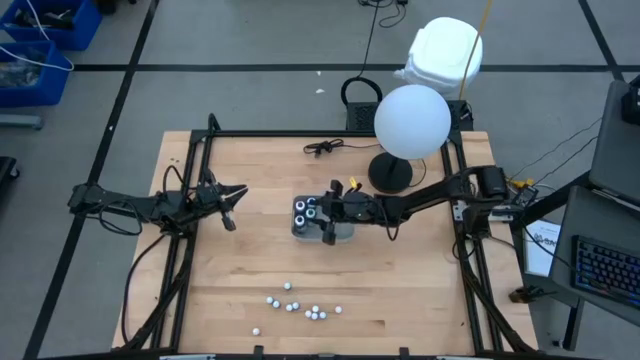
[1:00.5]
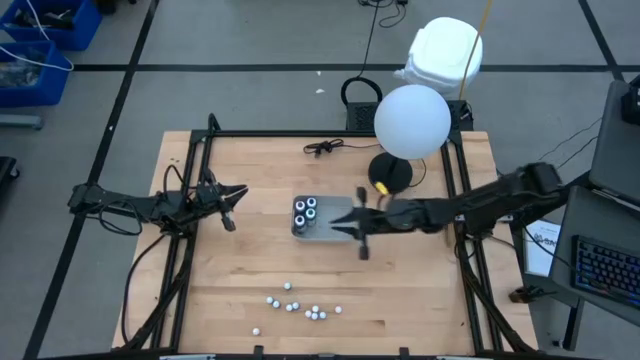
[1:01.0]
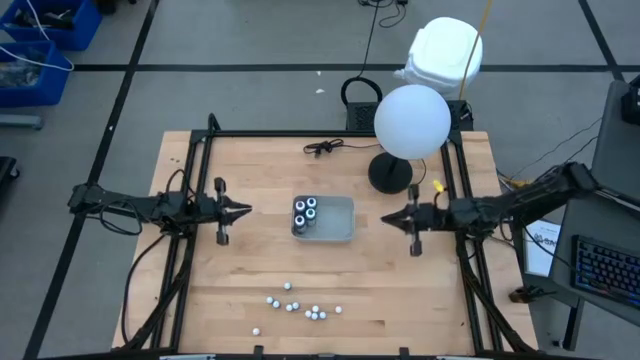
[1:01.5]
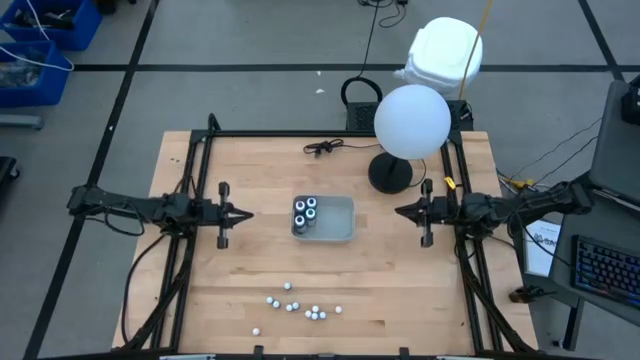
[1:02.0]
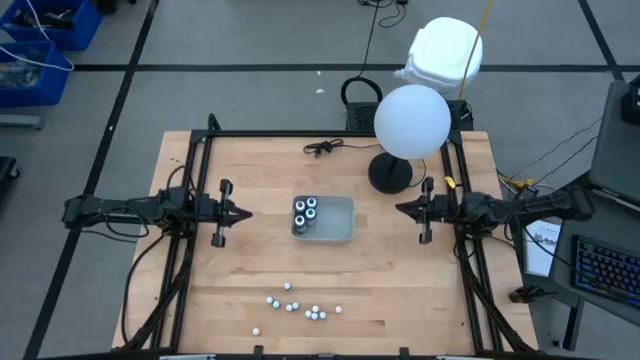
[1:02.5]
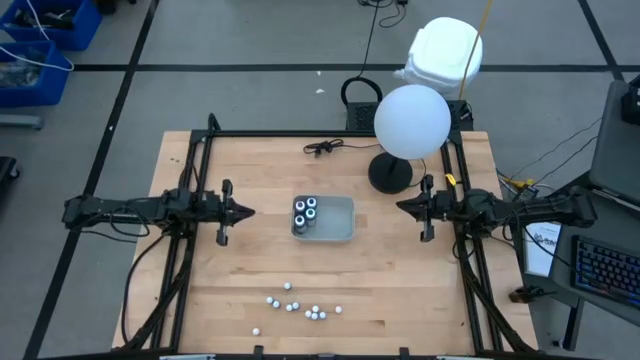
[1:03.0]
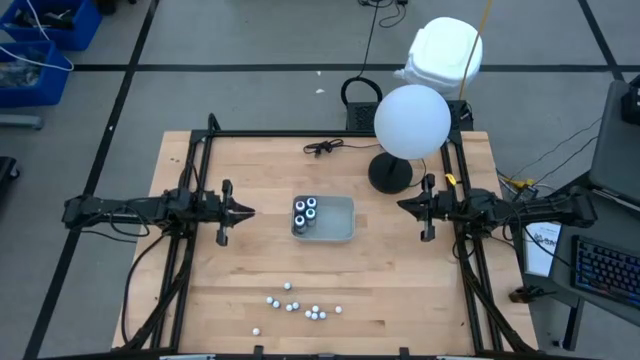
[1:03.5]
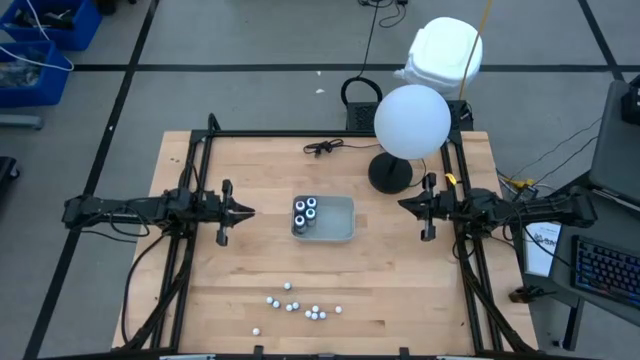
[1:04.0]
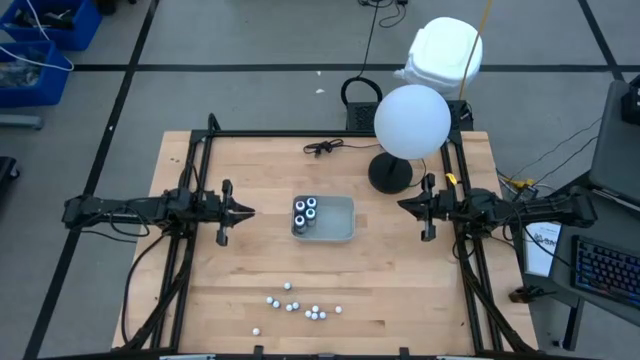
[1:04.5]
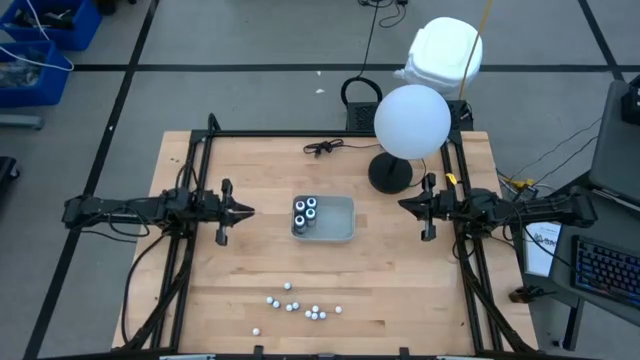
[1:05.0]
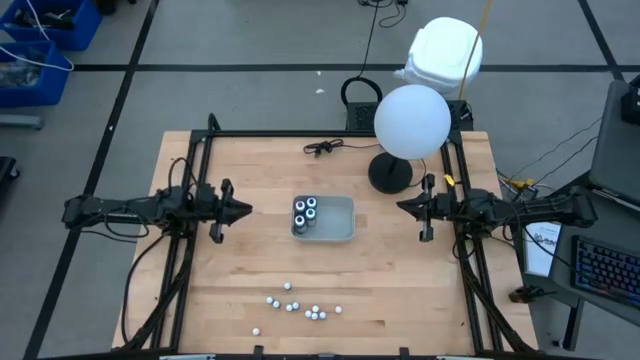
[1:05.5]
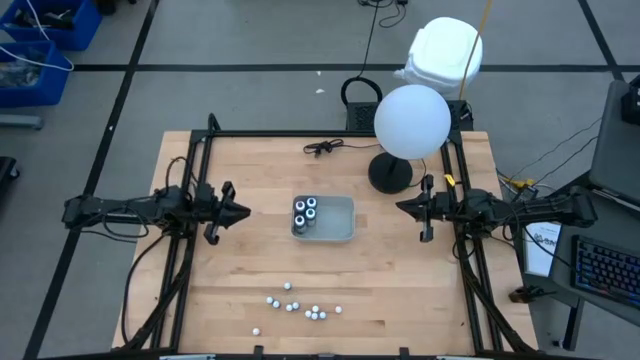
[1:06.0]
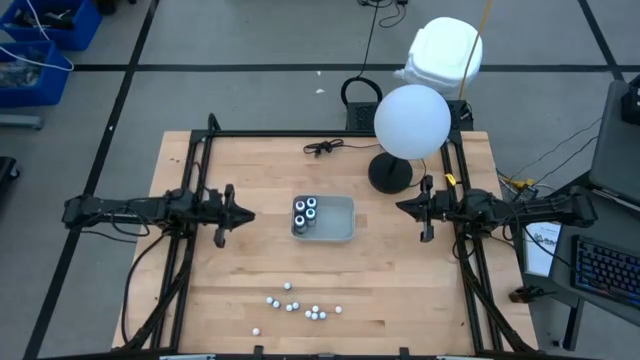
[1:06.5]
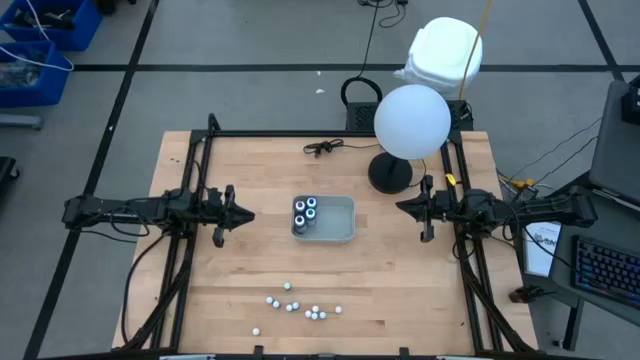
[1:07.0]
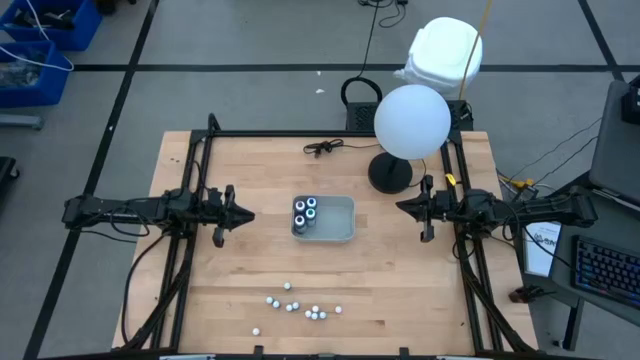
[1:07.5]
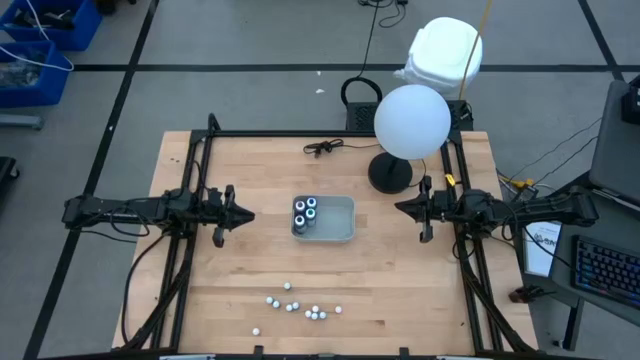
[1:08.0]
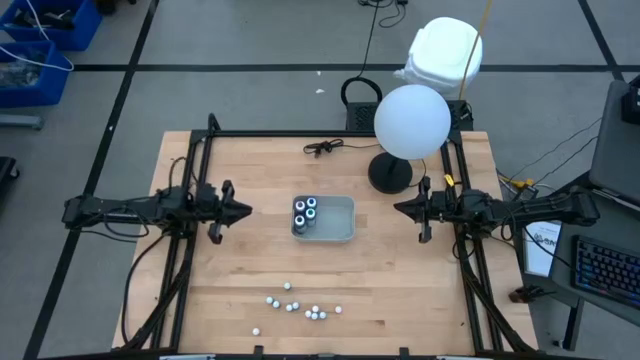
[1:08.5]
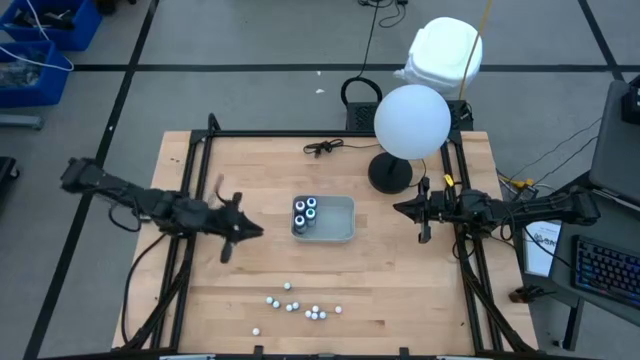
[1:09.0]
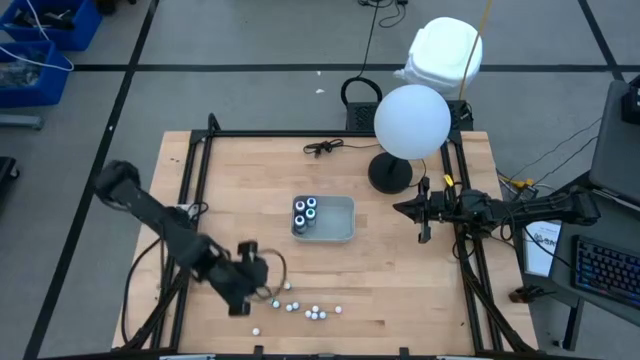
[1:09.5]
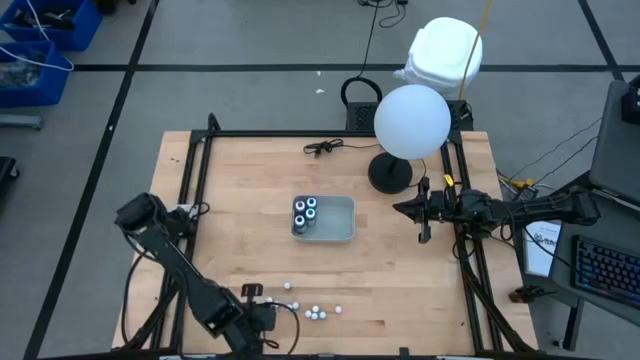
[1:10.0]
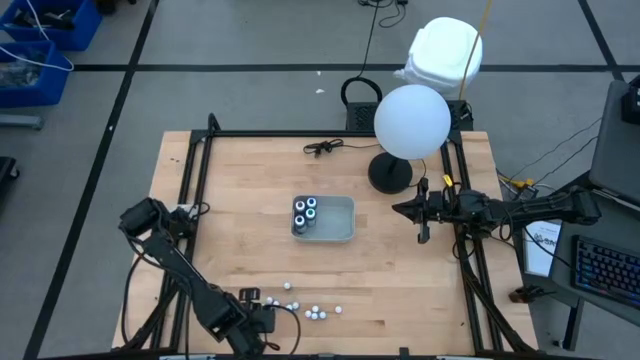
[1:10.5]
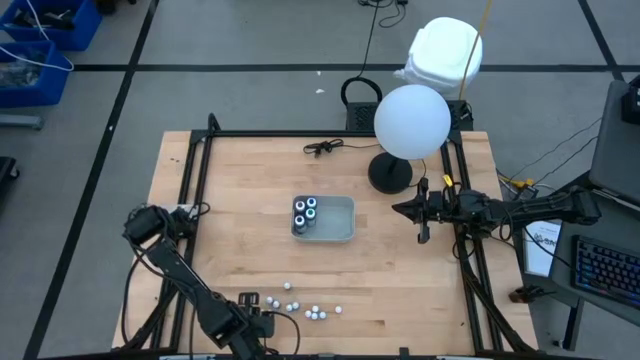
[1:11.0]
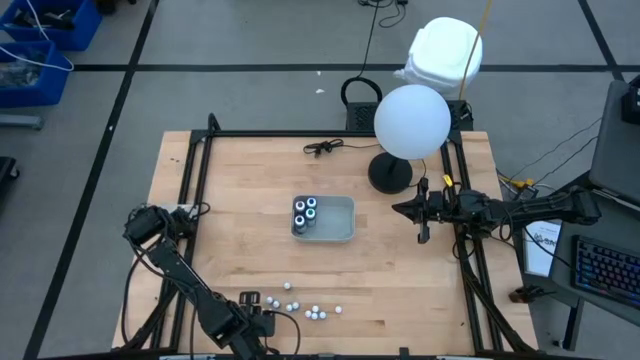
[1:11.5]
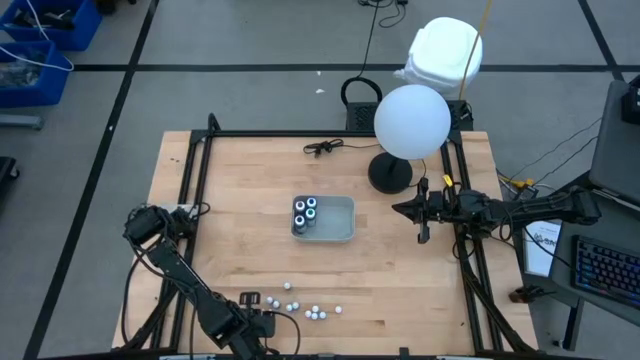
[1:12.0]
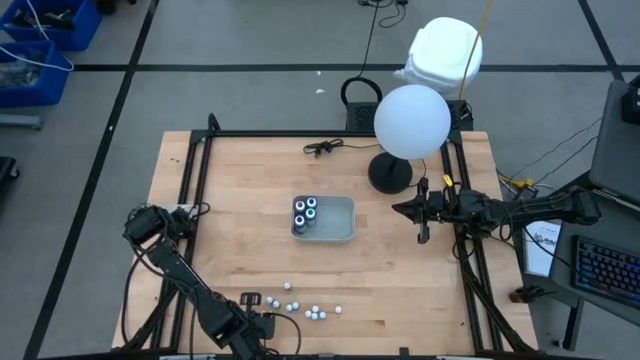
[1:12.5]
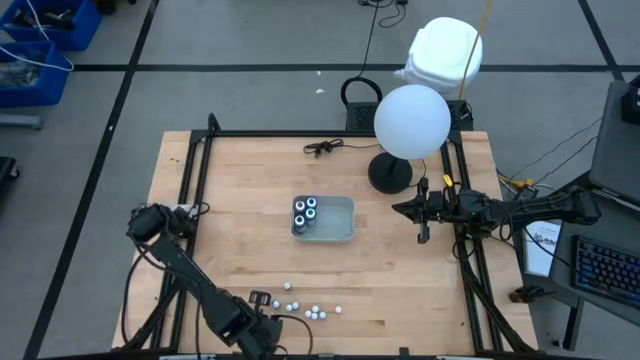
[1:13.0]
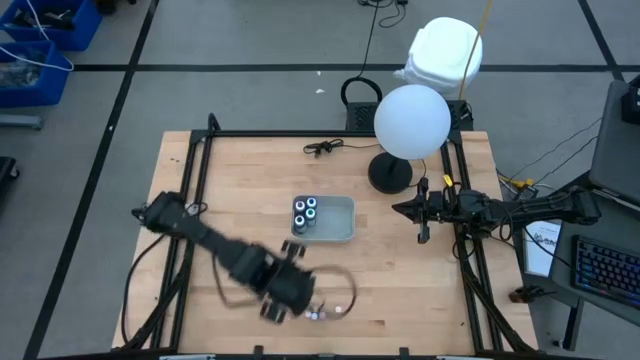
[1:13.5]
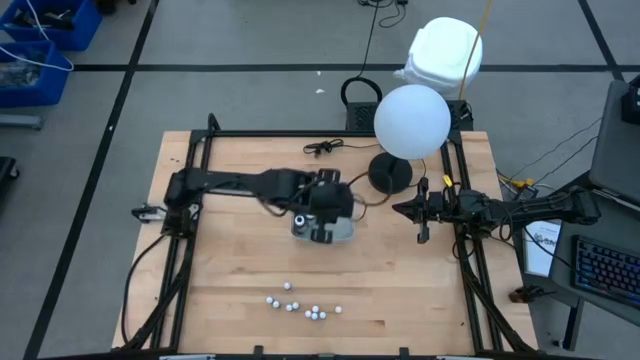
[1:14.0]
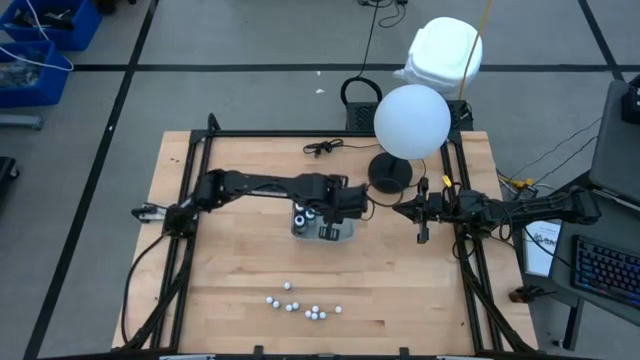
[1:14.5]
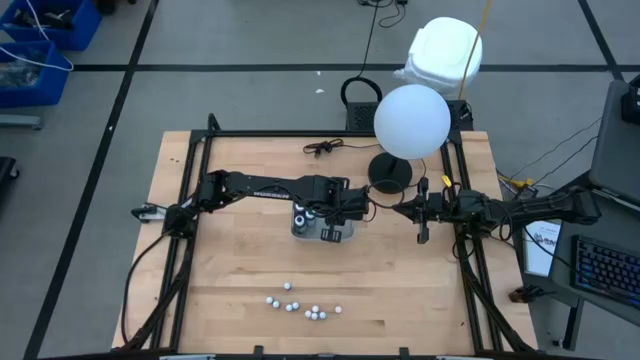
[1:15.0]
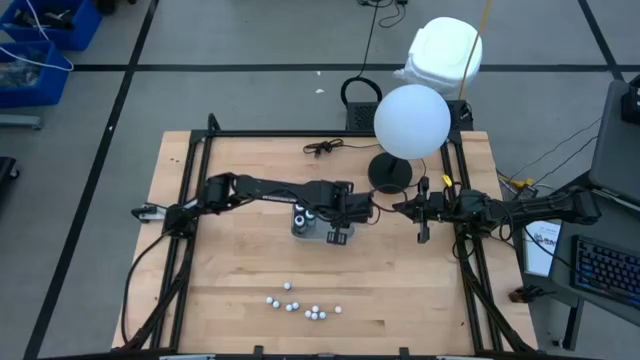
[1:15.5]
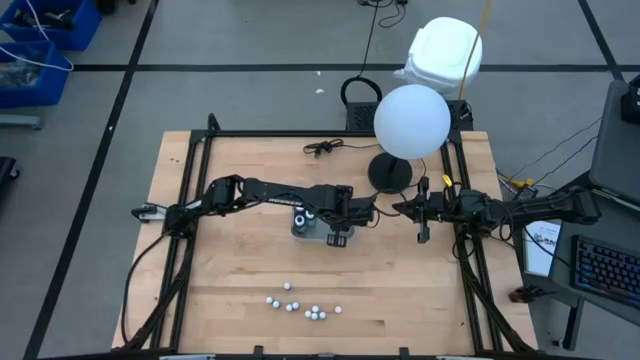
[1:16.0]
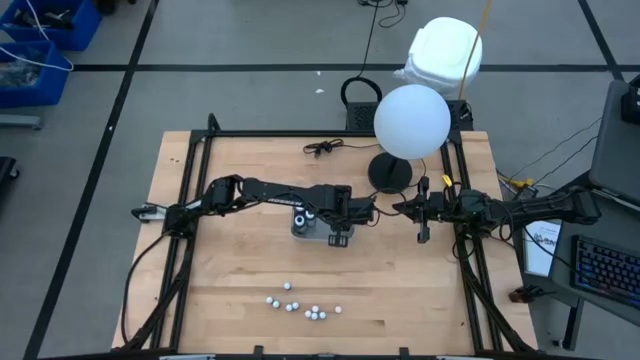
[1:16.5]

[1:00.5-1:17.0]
Task: Pick & Place food coloring
Put the small yellow food coloring bottle into the gray bin

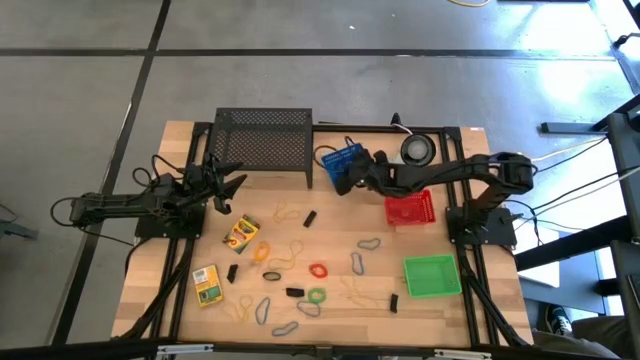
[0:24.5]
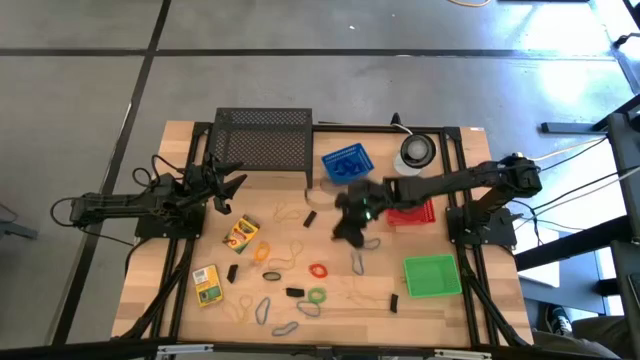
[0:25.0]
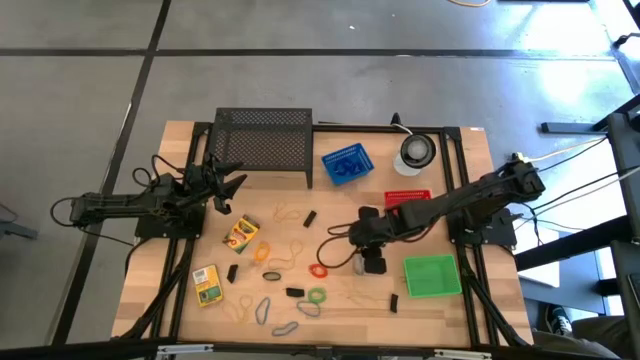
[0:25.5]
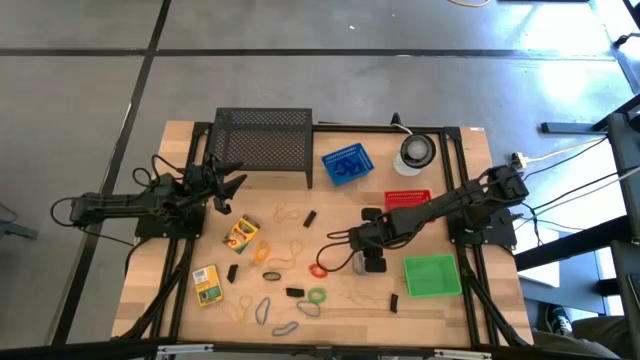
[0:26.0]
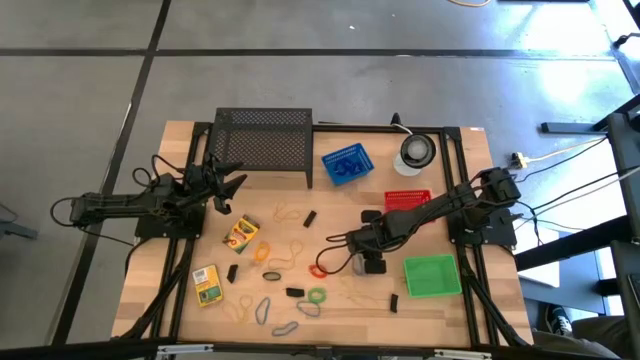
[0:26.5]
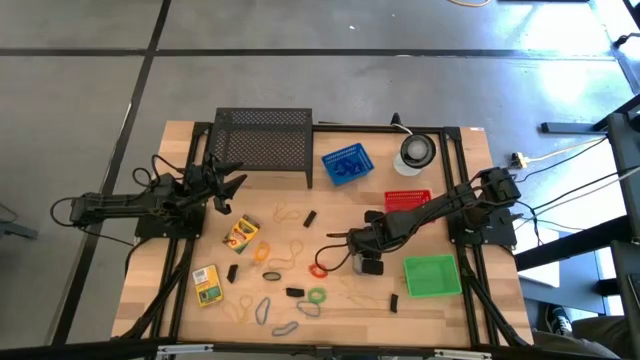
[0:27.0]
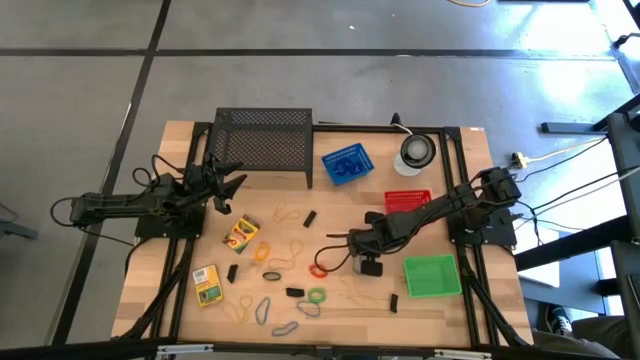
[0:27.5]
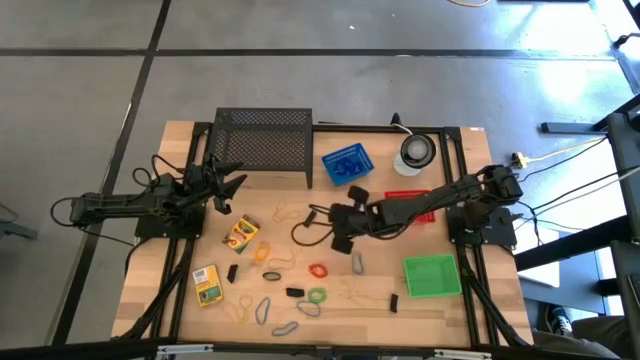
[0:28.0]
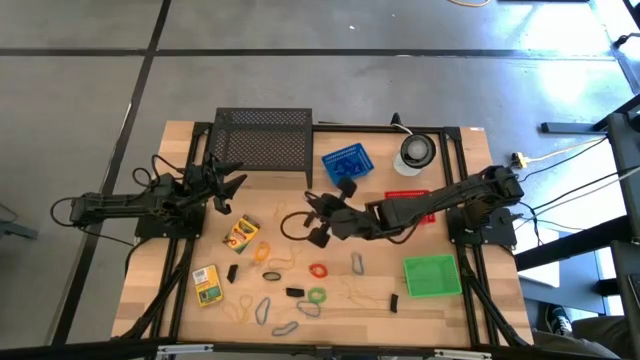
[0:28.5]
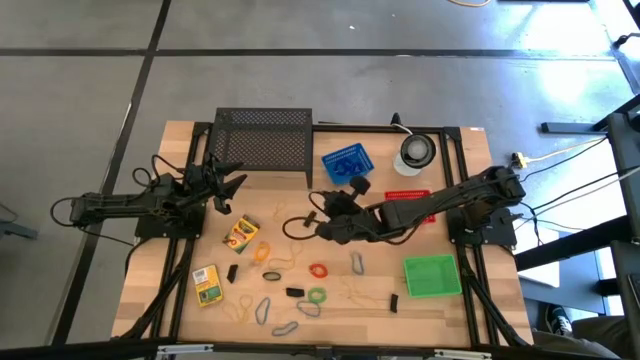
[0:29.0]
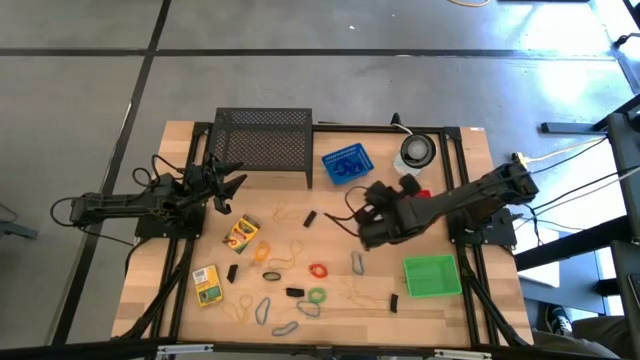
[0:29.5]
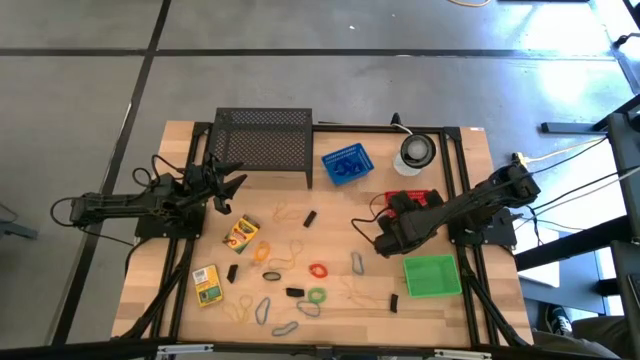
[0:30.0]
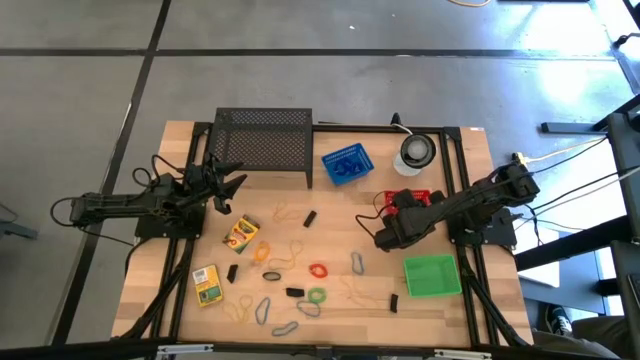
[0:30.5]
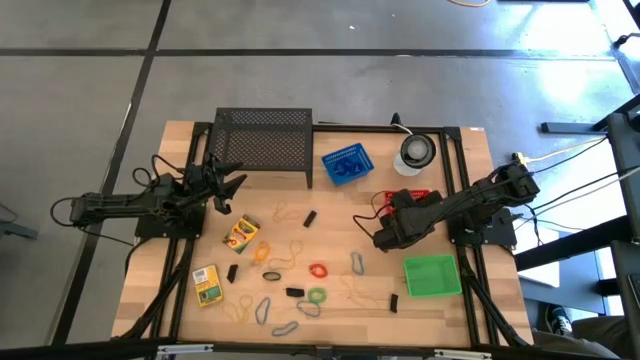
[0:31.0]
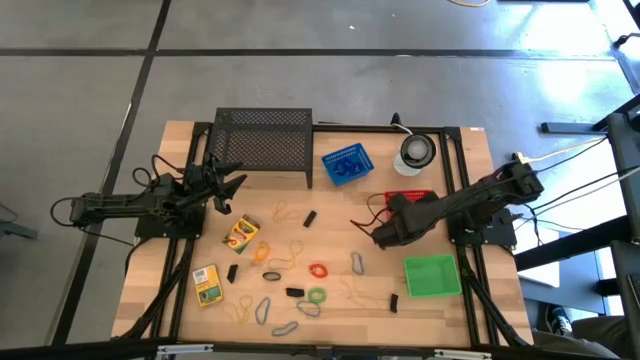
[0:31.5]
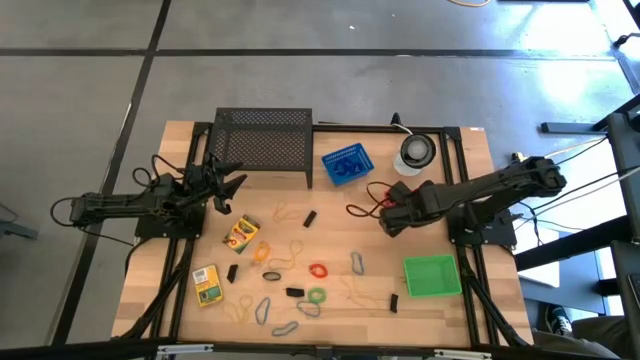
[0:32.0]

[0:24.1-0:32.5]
Task: Pick & Place Office Desk Supplies
Put the blue rubber band into the red bin
